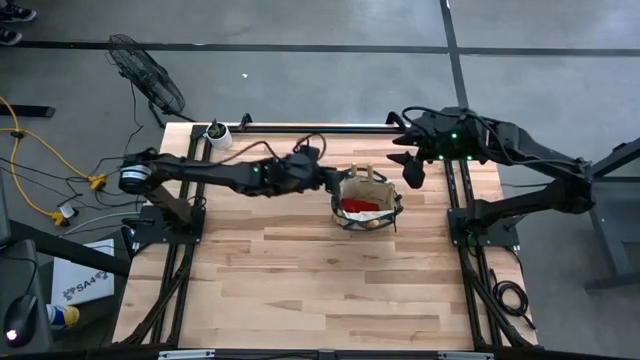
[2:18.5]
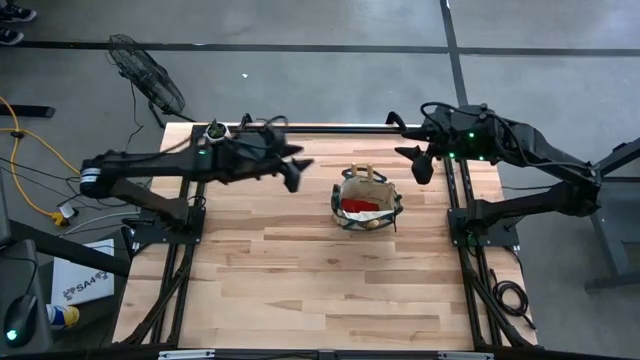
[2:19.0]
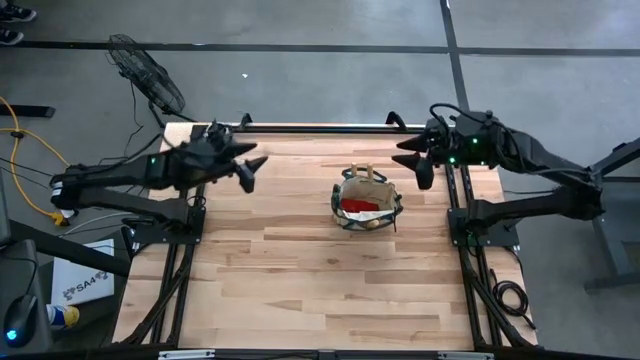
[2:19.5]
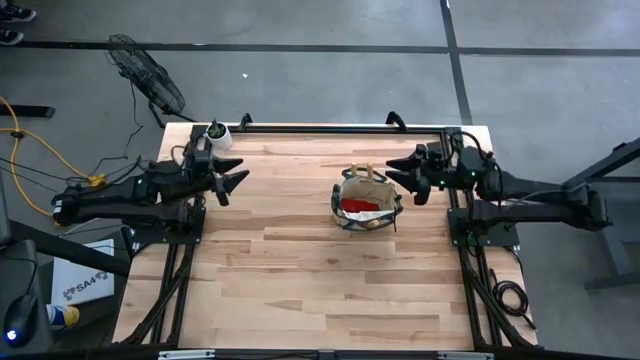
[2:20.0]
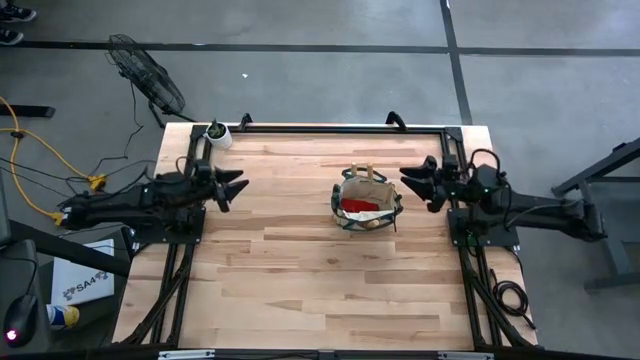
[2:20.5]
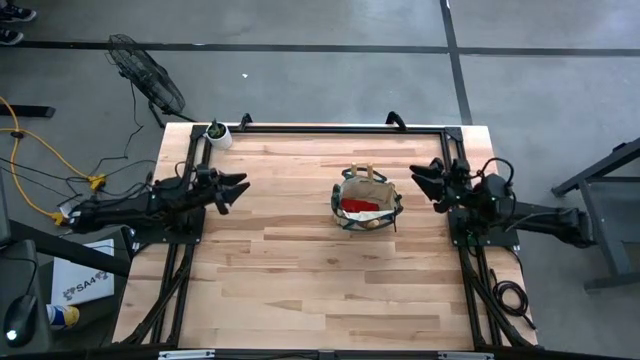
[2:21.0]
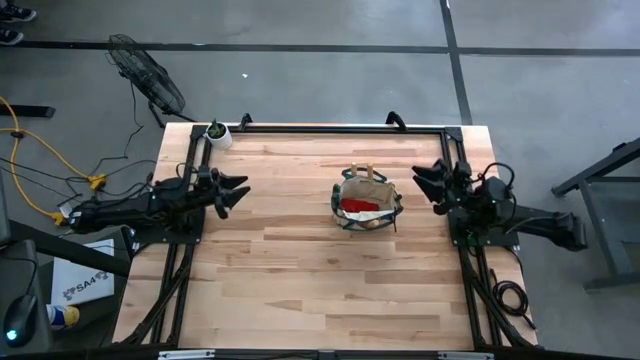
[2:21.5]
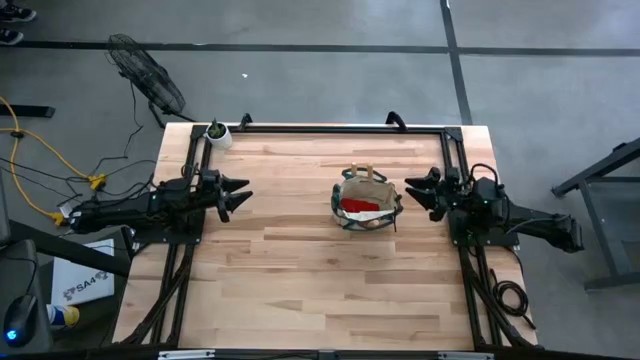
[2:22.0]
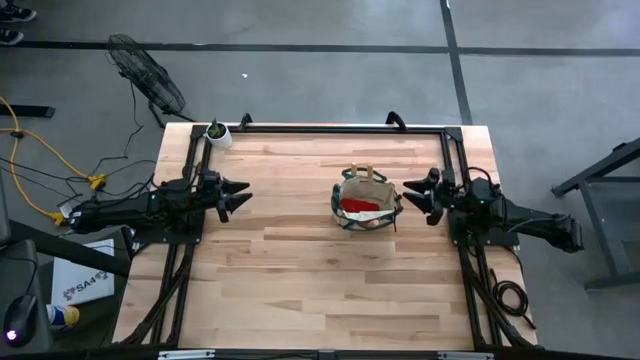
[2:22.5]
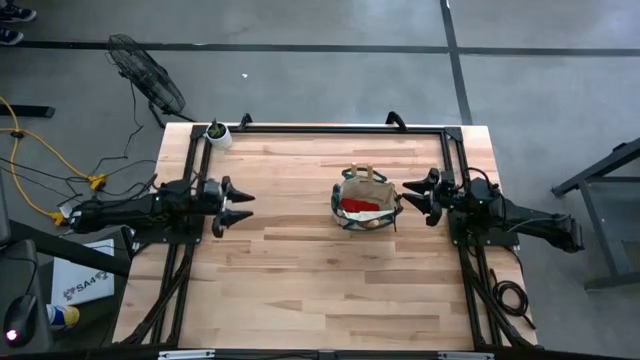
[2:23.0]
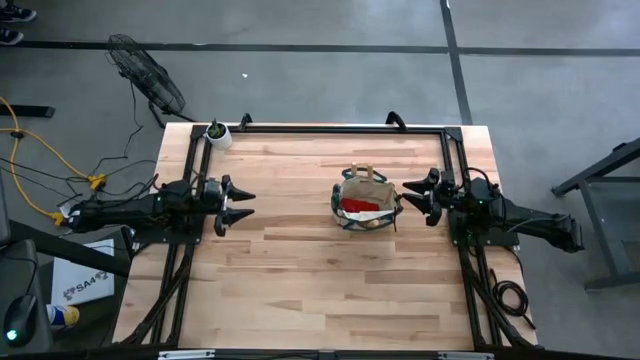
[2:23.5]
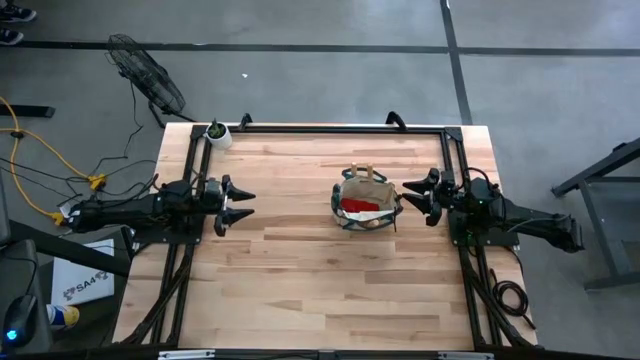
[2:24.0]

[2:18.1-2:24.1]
Task: Pick & Place Garden tools in Gardening bag
Return to Home Position

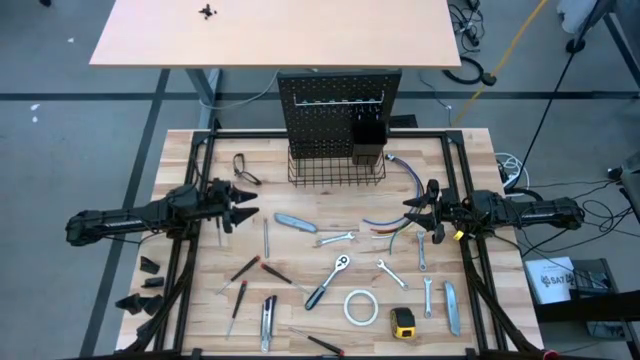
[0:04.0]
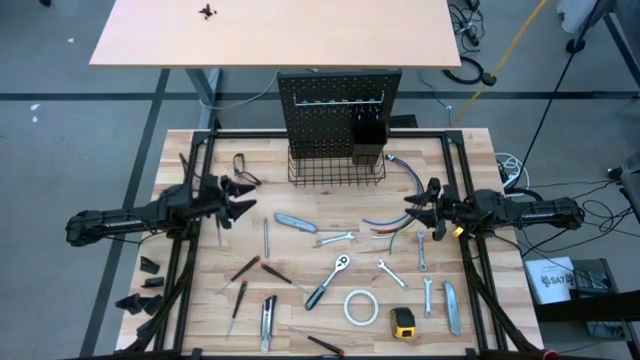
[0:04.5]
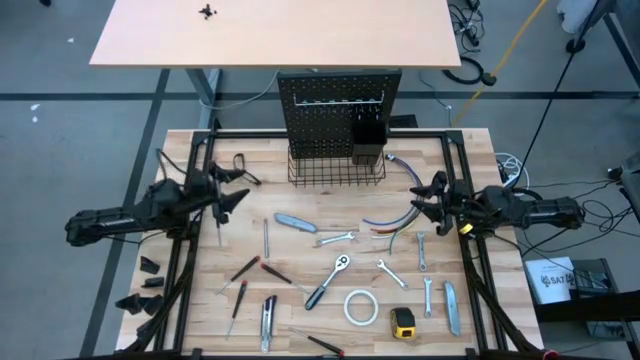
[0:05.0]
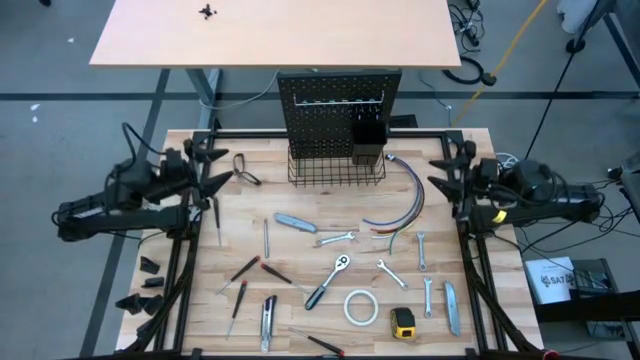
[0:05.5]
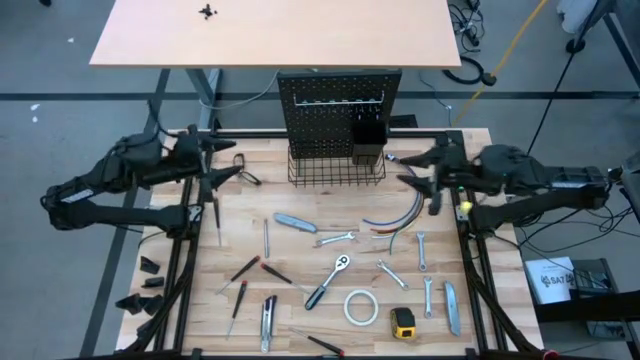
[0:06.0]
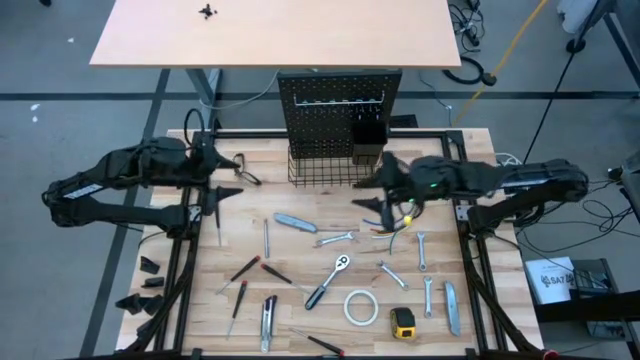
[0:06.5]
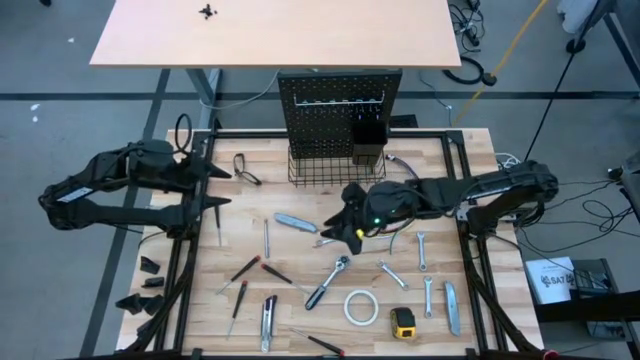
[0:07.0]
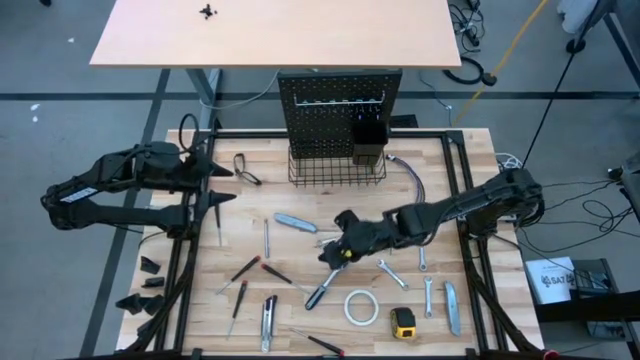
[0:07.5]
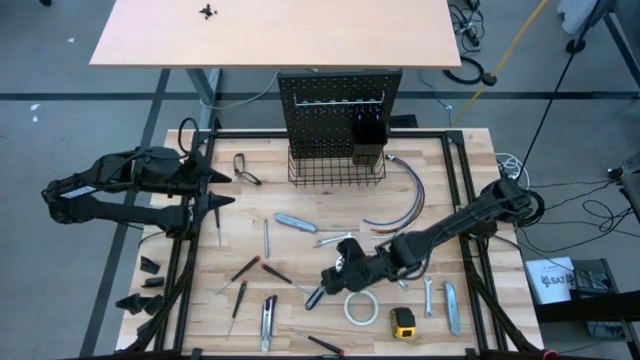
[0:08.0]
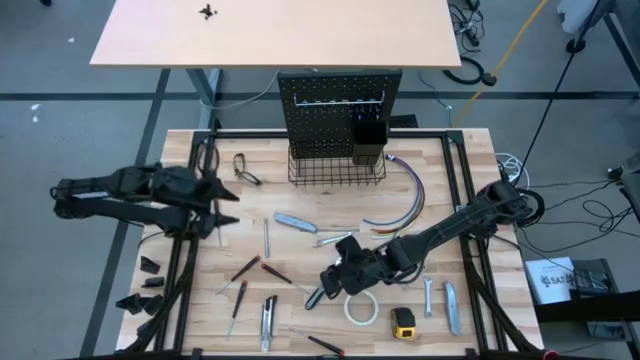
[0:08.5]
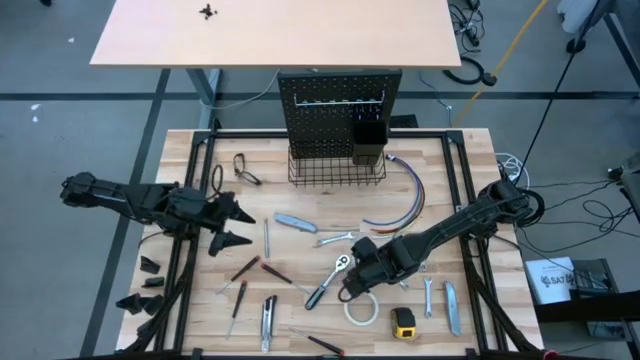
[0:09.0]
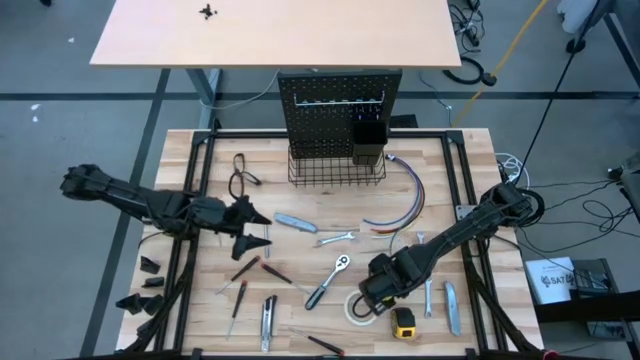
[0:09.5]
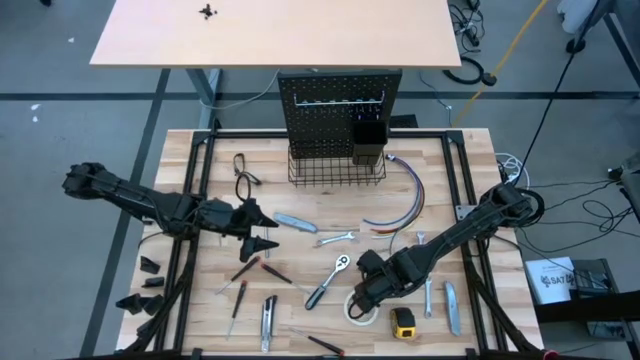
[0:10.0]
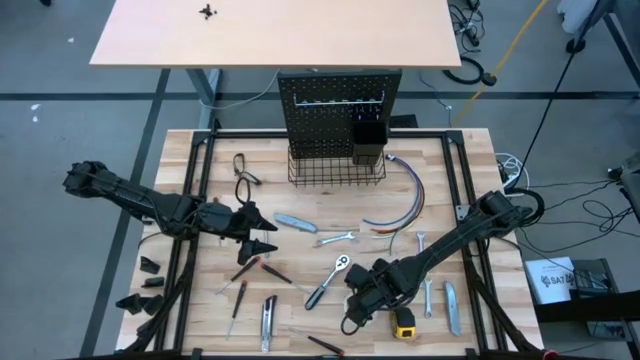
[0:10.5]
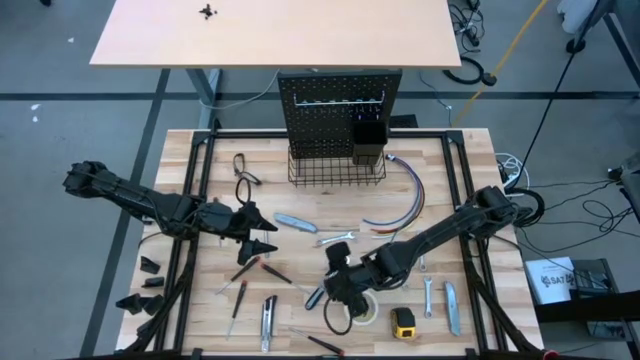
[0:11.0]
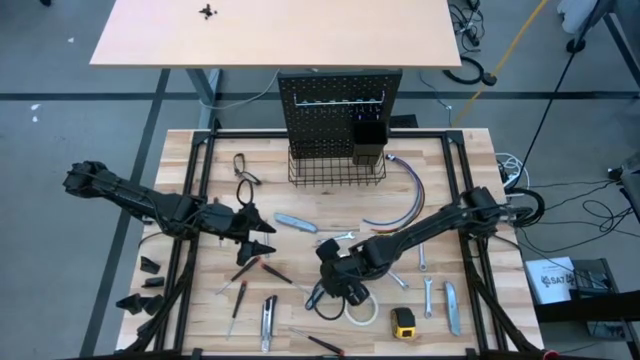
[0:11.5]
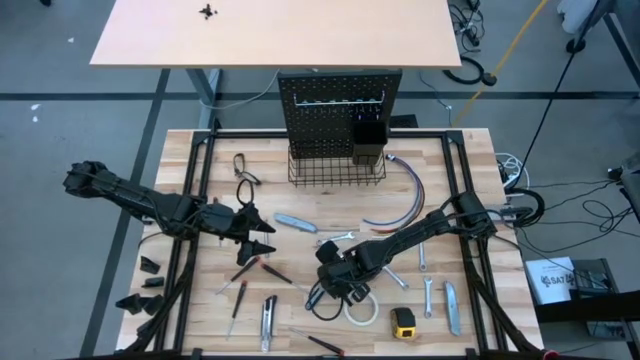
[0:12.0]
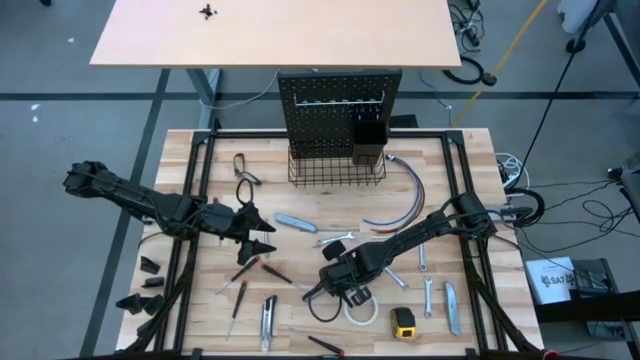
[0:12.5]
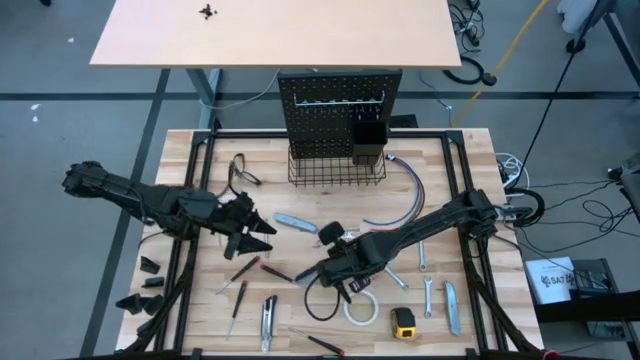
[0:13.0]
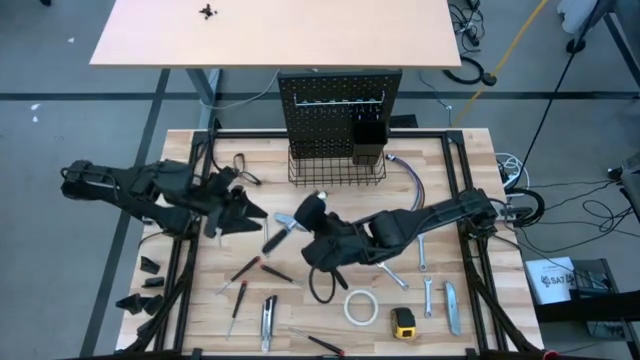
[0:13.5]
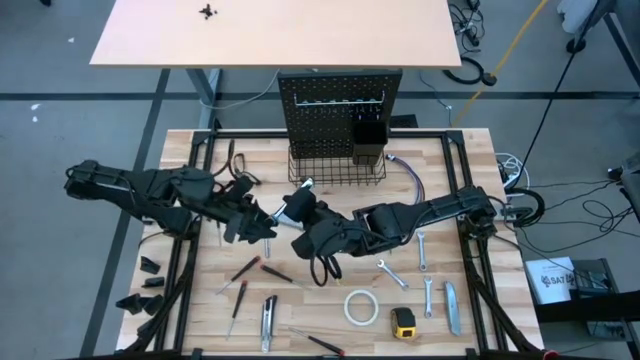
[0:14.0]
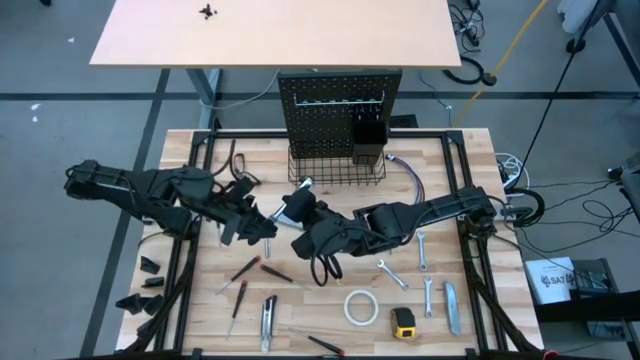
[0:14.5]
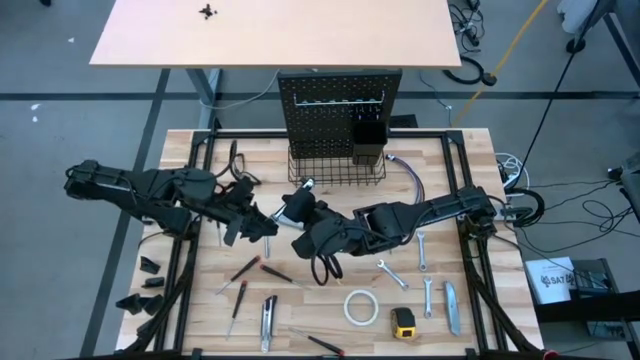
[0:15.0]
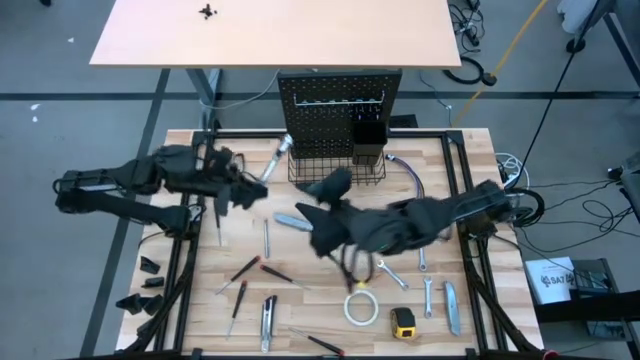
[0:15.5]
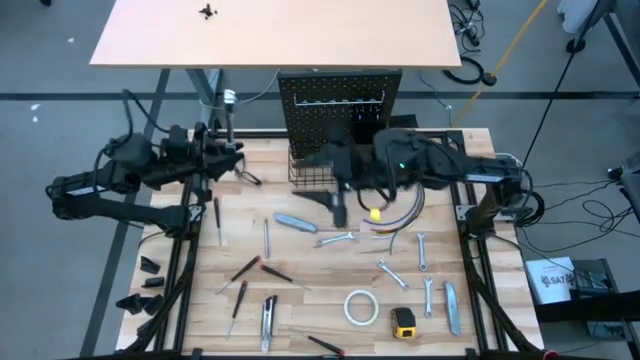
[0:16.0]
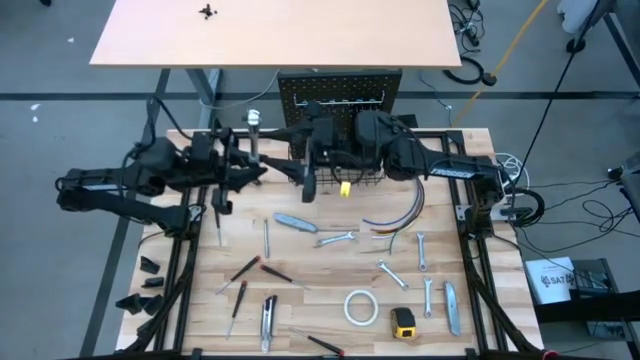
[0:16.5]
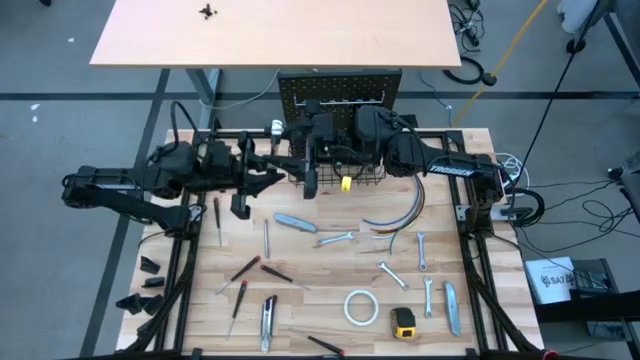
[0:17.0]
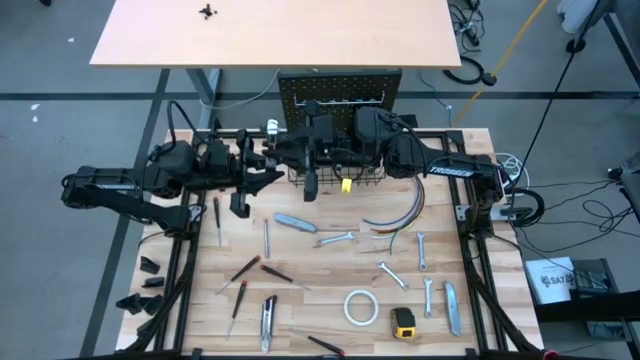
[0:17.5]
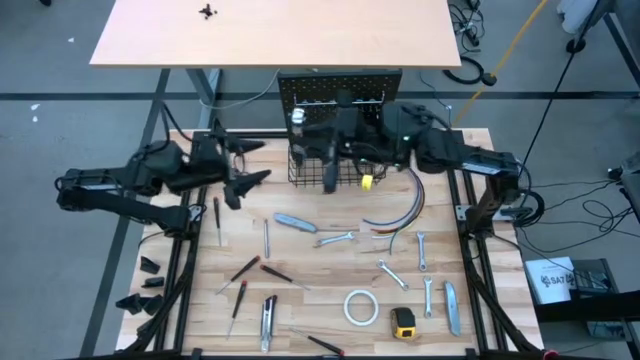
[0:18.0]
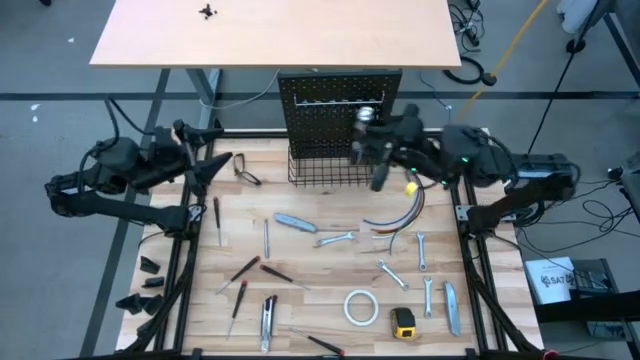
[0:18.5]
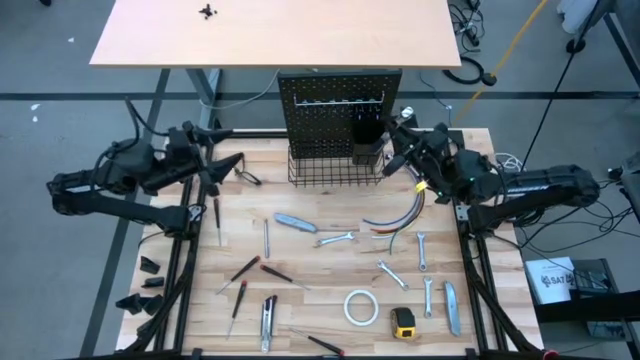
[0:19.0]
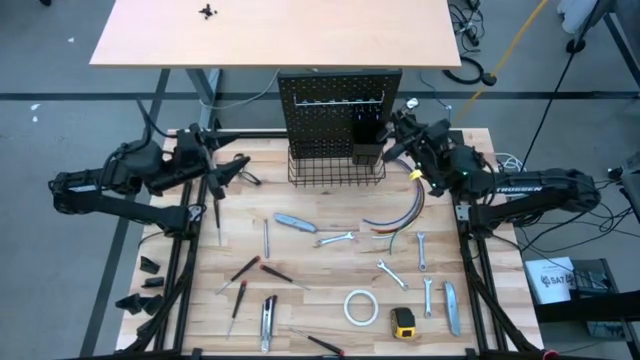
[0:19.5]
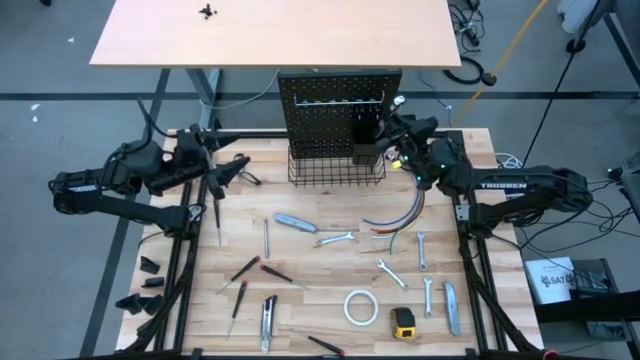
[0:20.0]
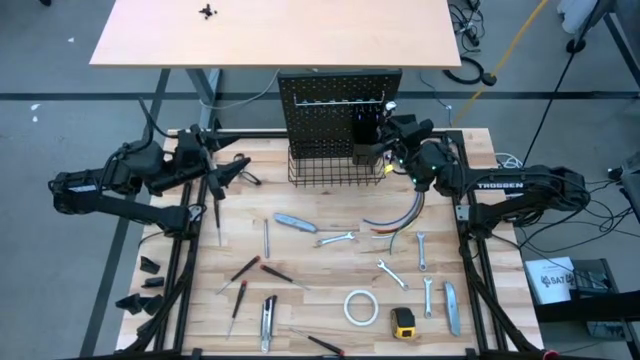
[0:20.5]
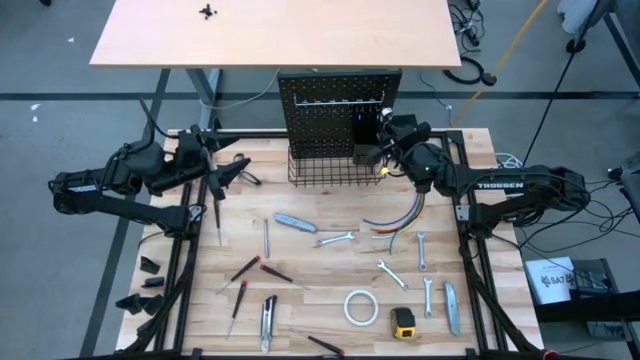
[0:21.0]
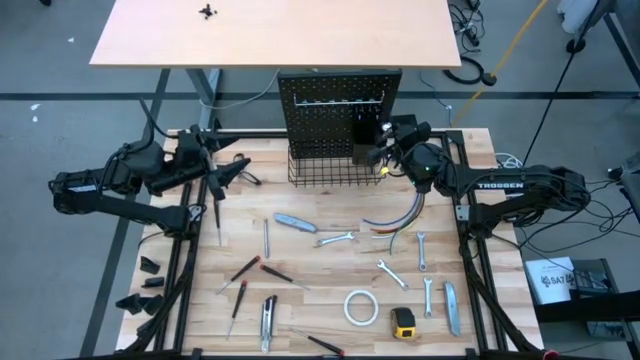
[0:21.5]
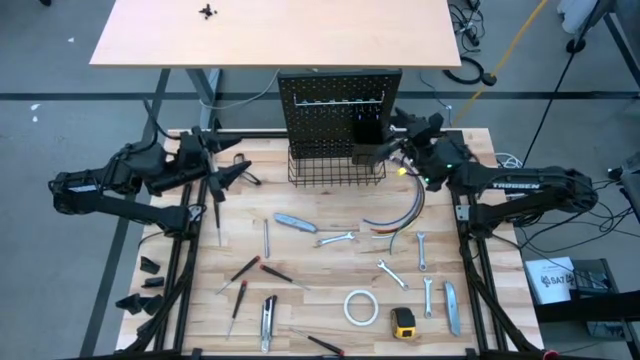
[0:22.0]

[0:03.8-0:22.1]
Task: Hang tools onto peg board
Put the ratchet wrench into the black bin on the pegboard
